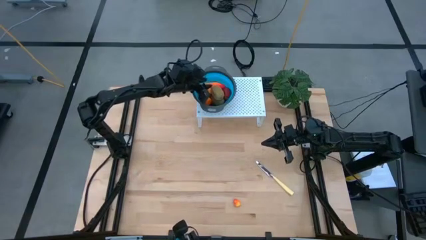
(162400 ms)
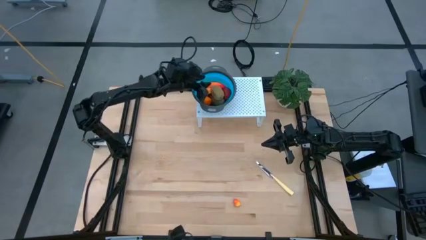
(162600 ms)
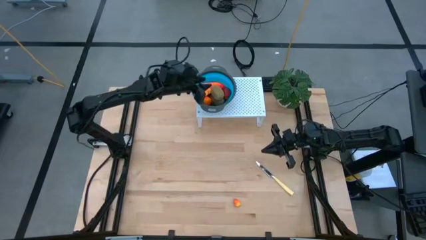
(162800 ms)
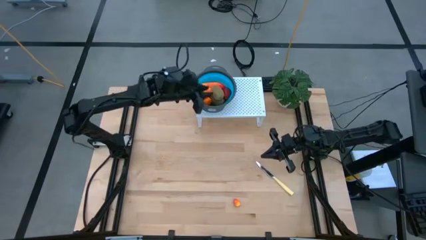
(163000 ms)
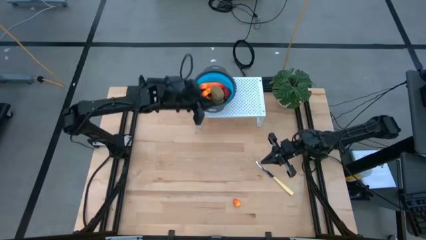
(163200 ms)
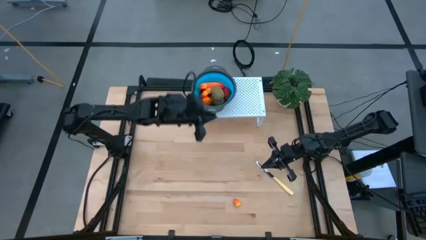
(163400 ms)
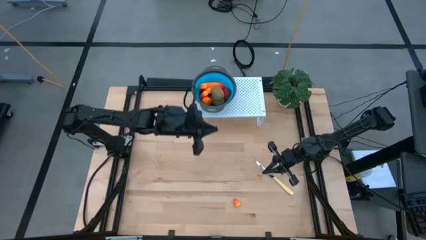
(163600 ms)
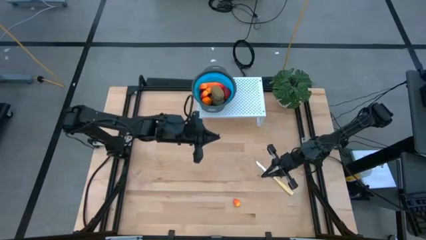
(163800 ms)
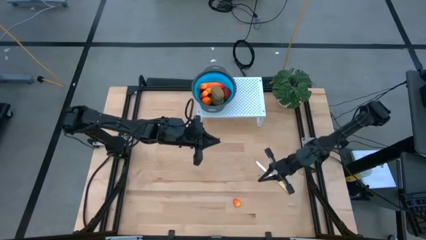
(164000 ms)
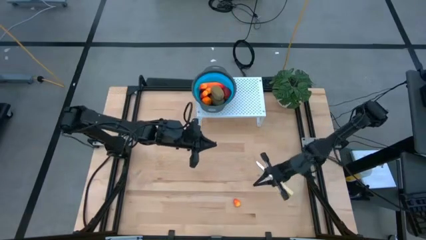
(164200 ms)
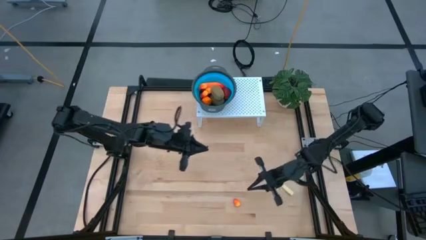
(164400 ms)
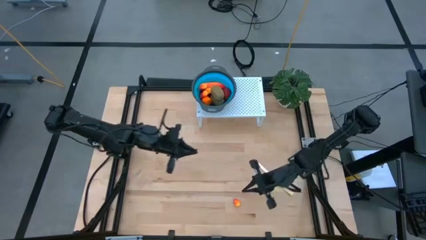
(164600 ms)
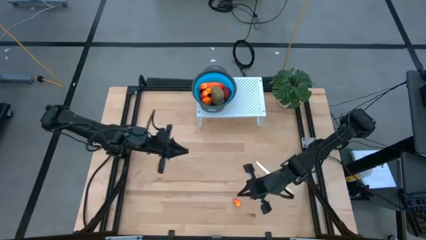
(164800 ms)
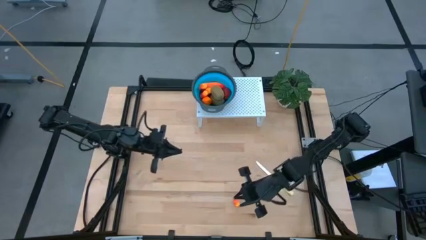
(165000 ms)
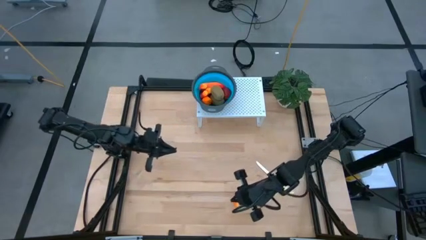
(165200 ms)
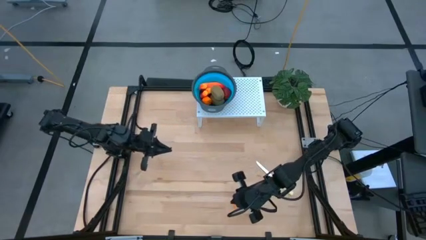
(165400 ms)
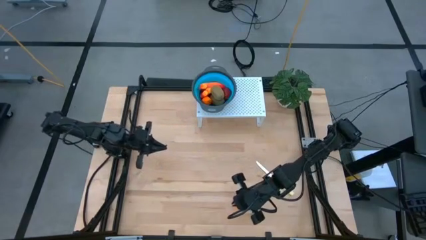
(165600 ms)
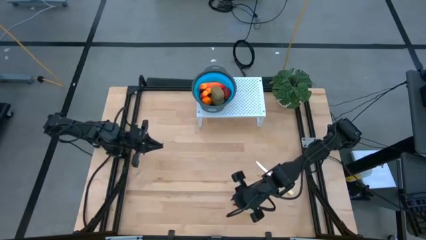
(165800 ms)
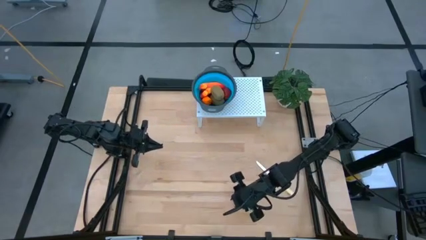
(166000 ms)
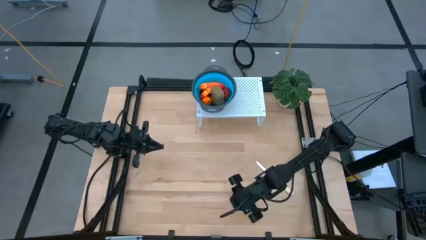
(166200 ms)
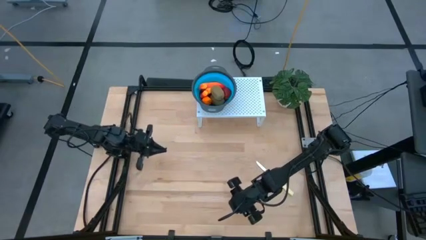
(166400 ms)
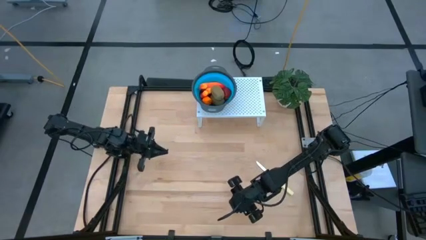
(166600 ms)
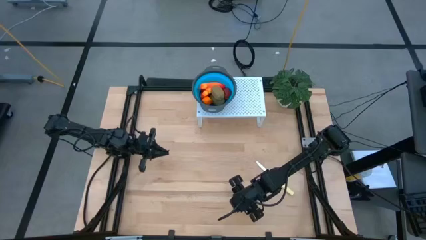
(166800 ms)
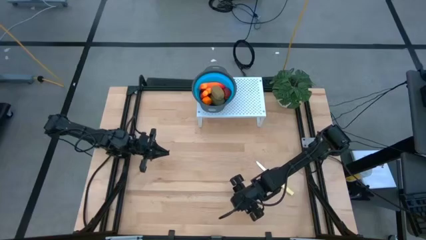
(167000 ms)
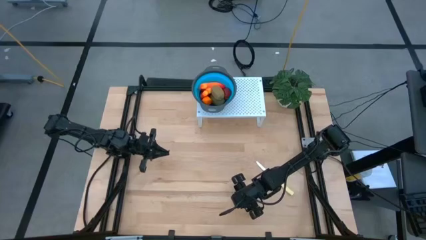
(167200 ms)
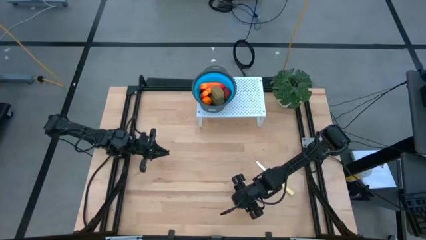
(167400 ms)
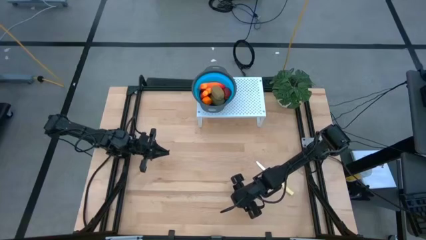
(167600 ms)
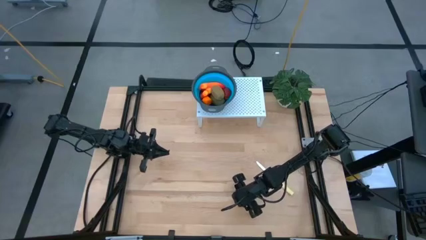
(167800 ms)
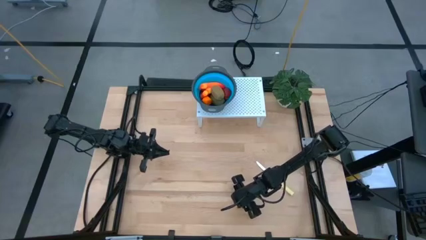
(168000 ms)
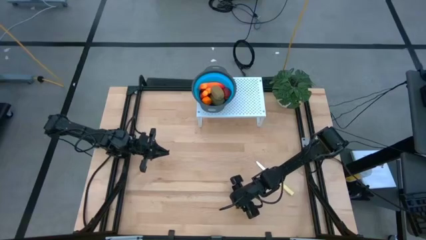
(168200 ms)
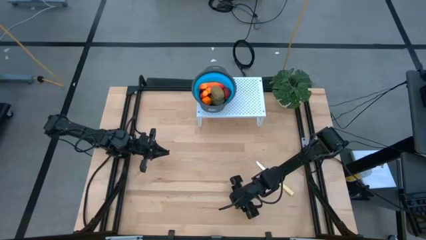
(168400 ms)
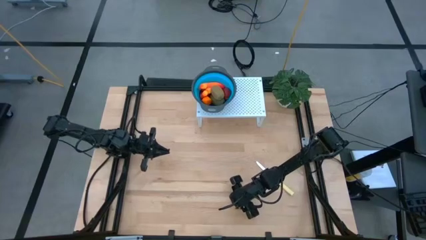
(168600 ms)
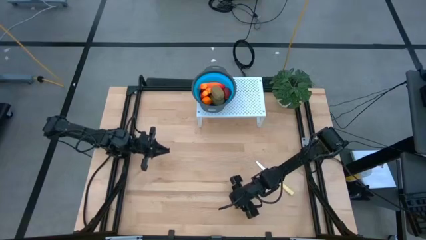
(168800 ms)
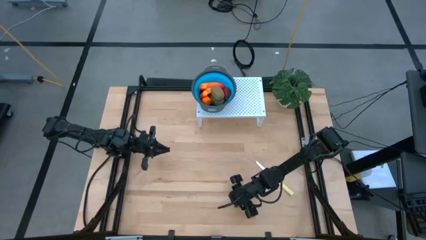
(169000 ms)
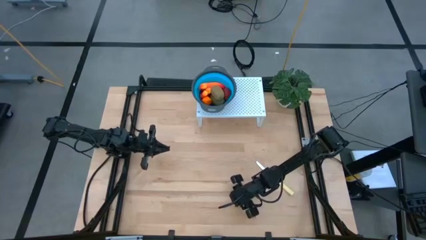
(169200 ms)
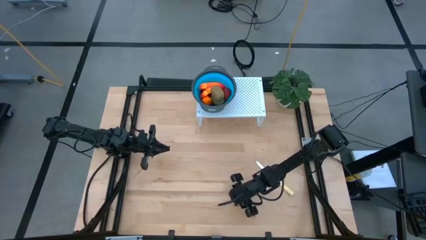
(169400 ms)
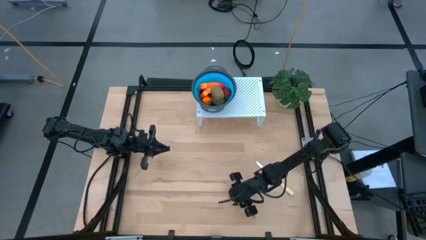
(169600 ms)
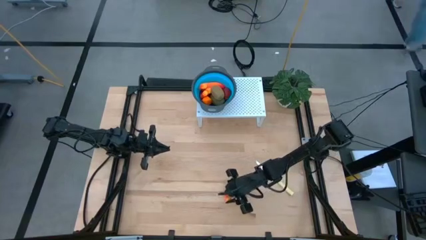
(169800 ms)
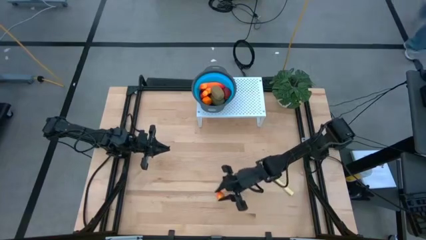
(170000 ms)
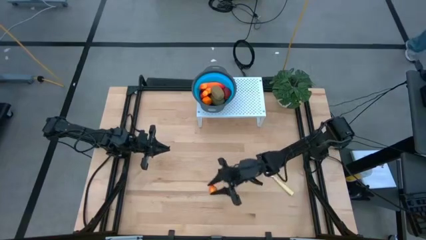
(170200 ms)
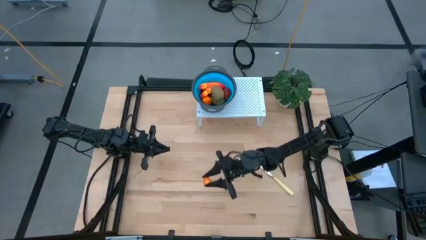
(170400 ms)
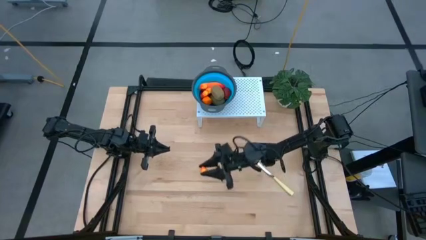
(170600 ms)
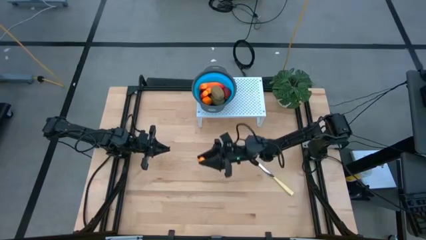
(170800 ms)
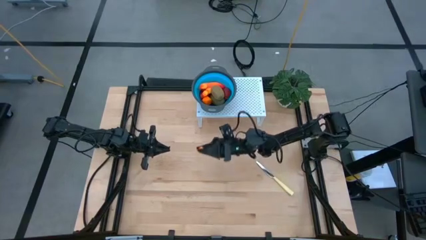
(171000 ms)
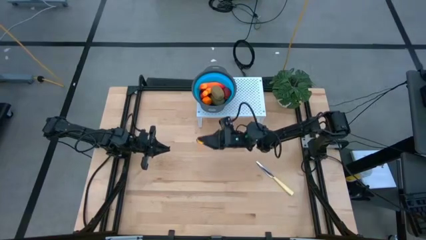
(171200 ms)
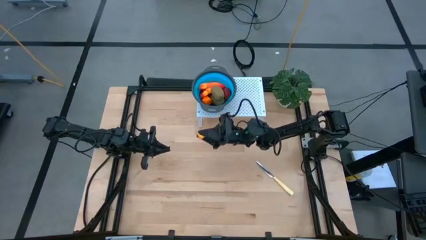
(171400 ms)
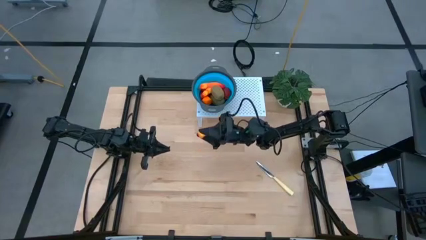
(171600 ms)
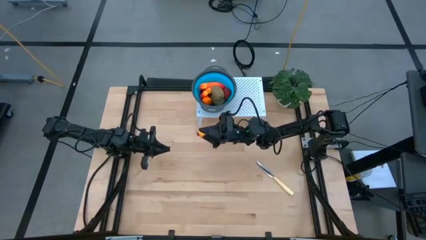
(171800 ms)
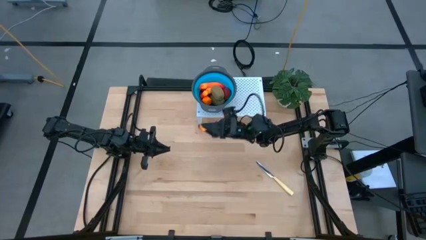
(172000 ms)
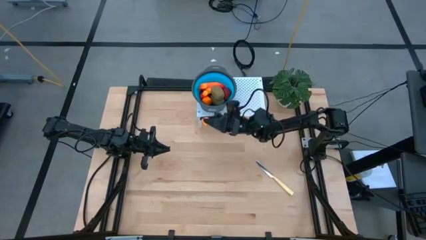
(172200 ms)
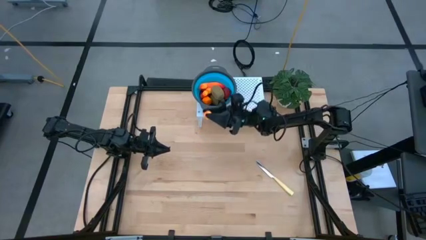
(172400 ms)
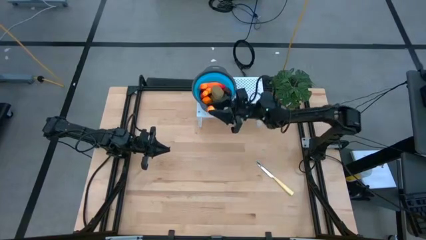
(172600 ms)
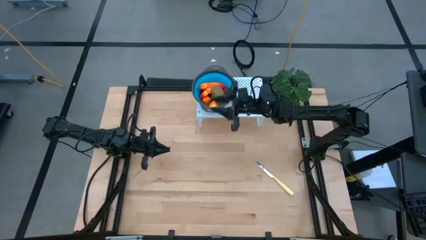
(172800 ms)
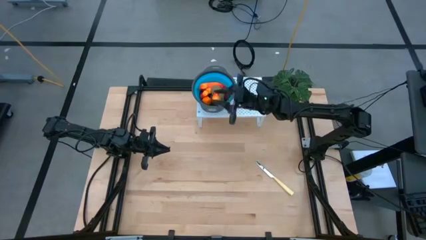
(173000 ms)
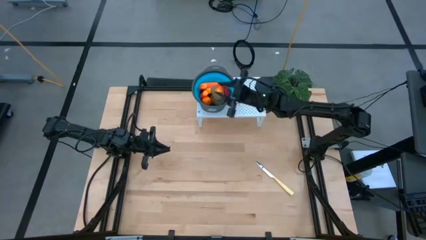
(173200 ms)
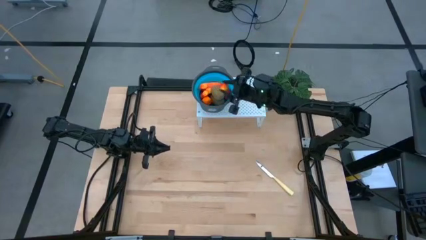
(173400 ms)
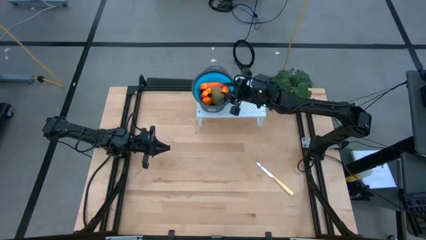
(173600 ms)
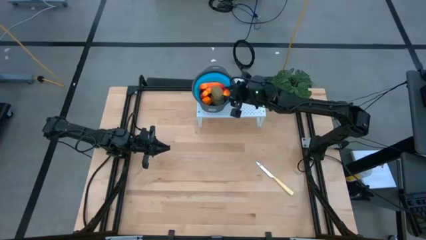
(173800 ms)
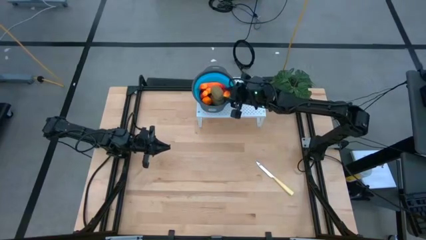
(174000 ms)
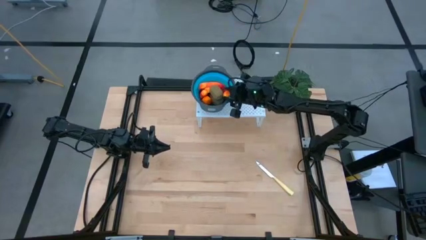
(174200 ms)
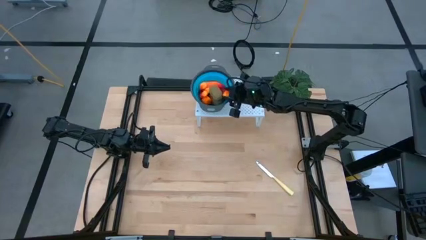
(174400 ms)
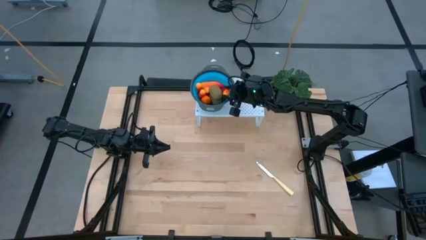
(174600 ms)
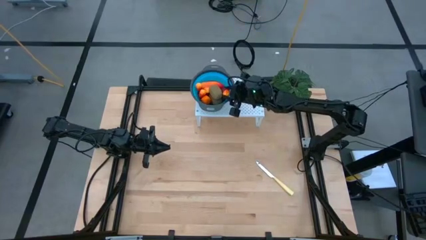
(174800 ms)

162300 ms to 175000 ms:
Task: Pick & Place Fruit
Put the peach into the blue strainer bowl on the shelf

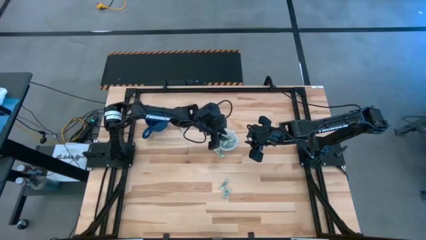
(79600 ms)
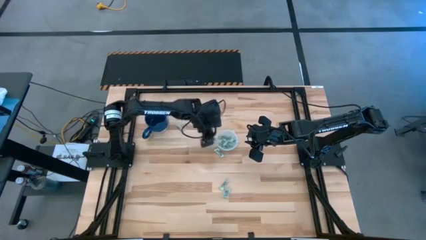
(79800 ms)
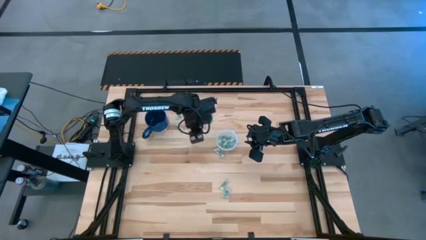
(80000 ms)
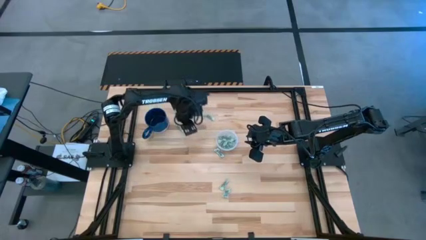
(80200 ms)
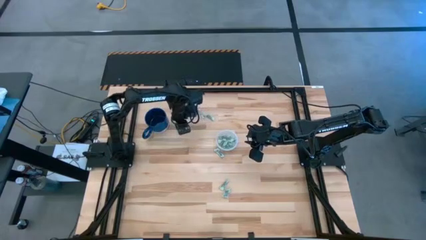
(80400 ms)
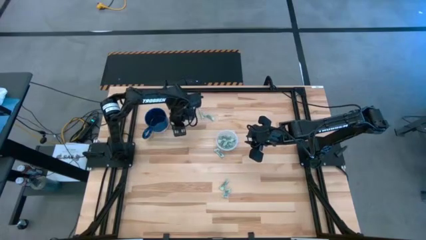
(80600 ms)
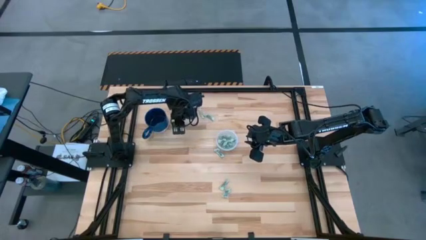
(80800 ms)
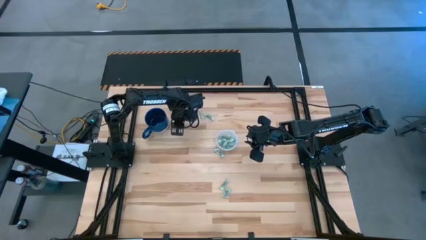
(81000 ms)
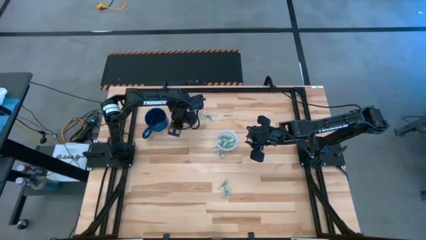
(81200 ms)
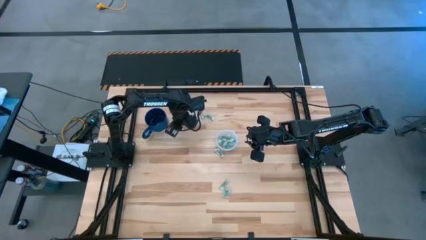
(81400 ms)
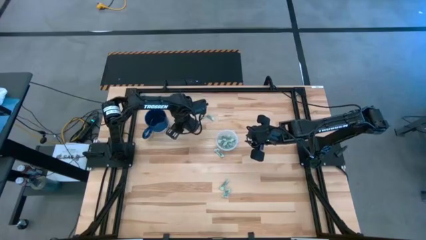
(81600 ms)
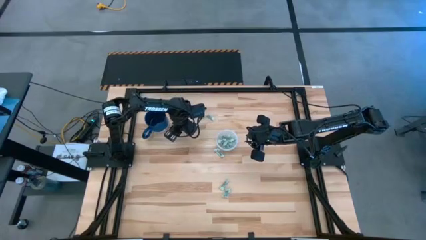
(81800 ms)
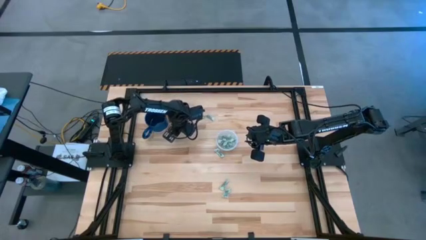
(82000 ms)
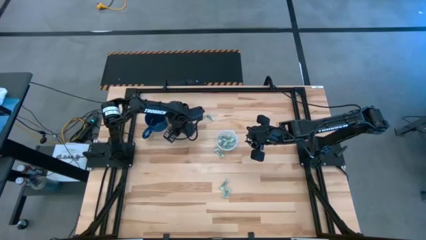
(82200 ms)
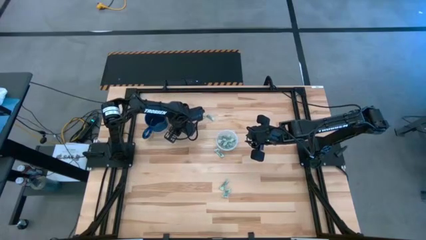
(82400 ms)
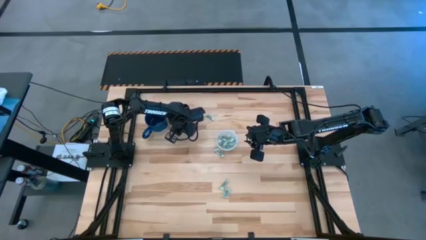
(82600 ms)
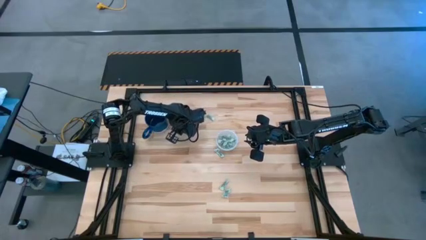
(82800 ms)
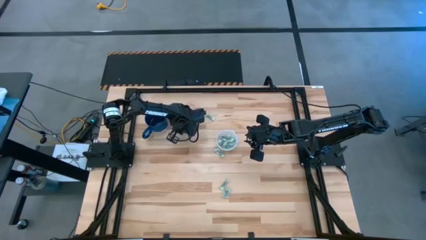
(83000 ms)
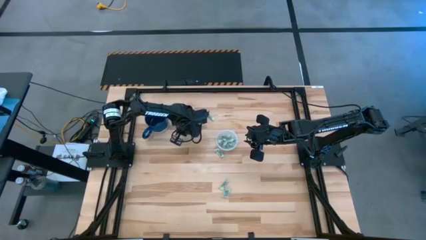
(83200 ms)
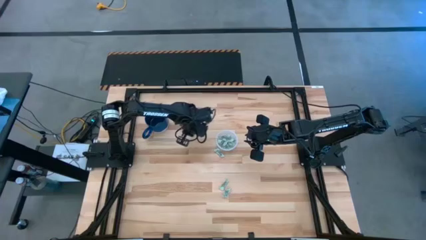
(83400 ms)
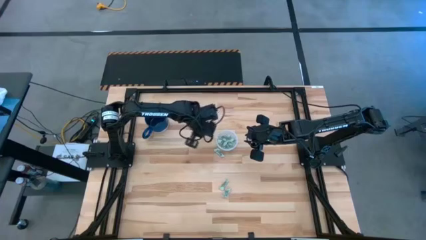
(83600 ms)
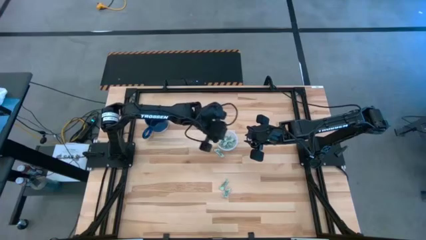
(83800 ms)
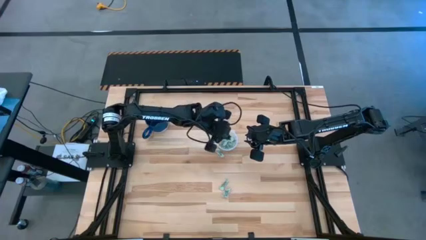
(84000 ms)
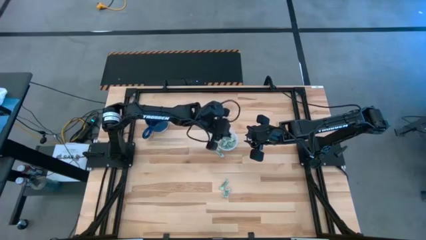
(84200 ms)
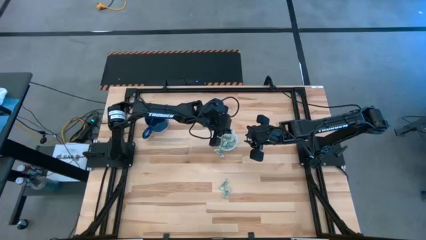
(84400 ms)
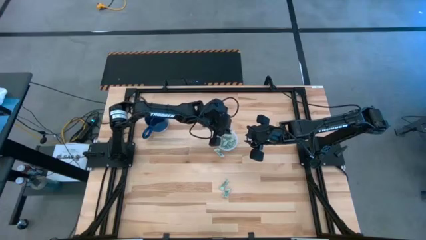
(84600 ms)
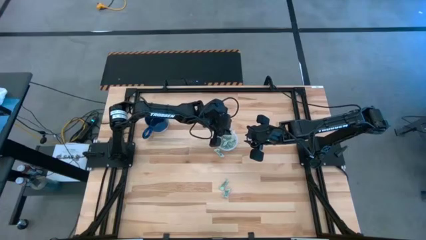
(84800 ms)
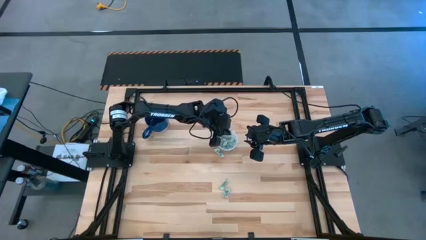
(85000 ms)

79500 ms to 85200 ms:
Task: Pick and place items into bin
Put the gray stevia packet into the transparent bin
